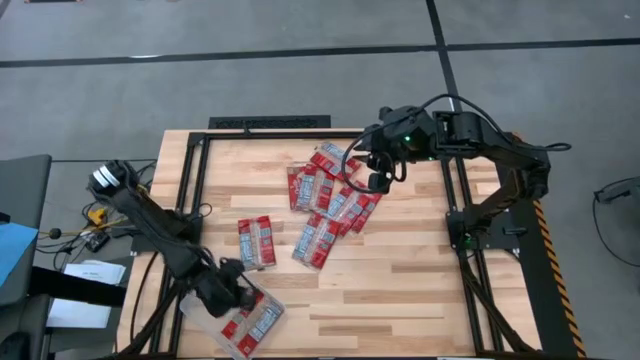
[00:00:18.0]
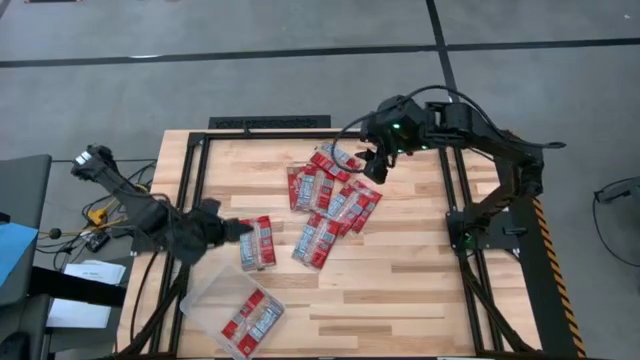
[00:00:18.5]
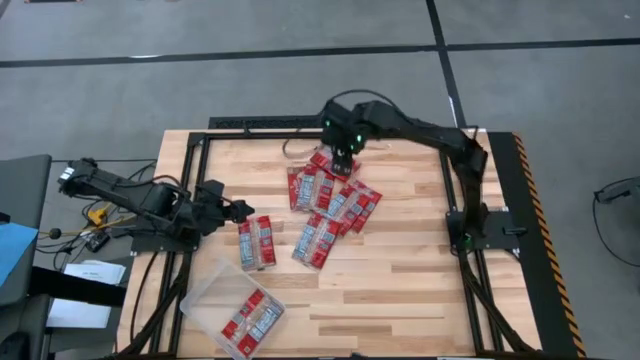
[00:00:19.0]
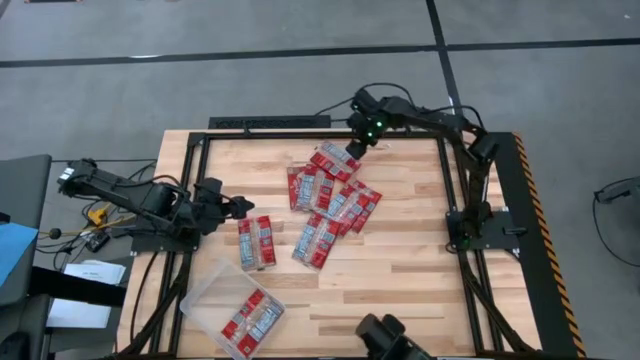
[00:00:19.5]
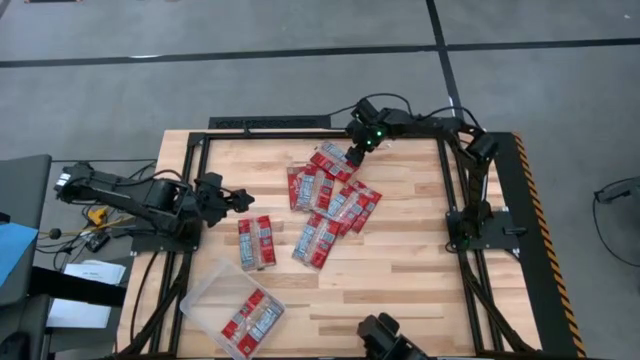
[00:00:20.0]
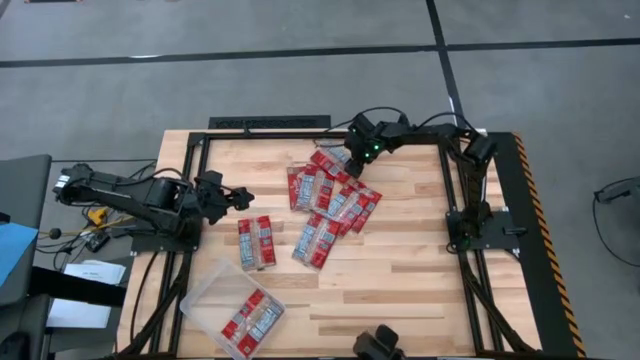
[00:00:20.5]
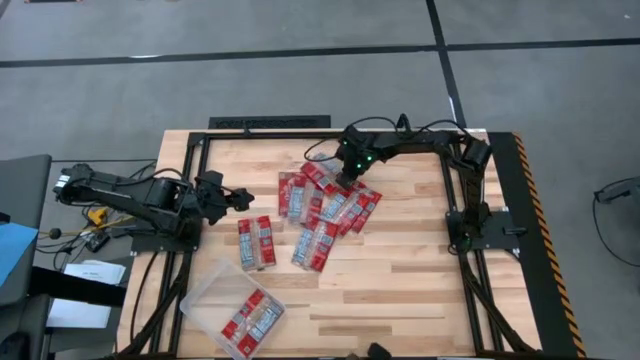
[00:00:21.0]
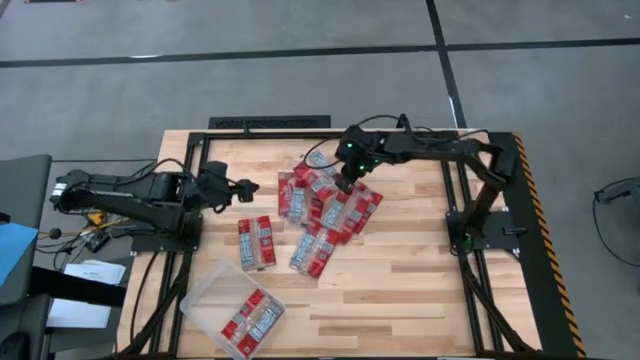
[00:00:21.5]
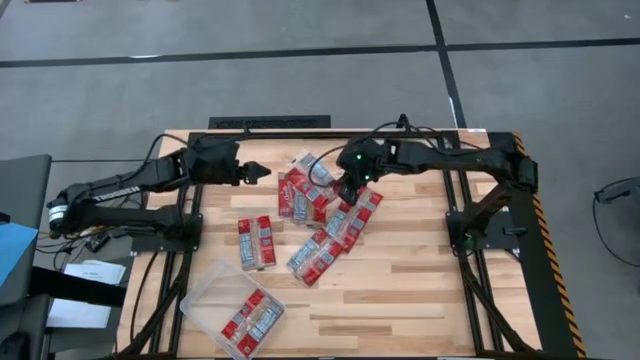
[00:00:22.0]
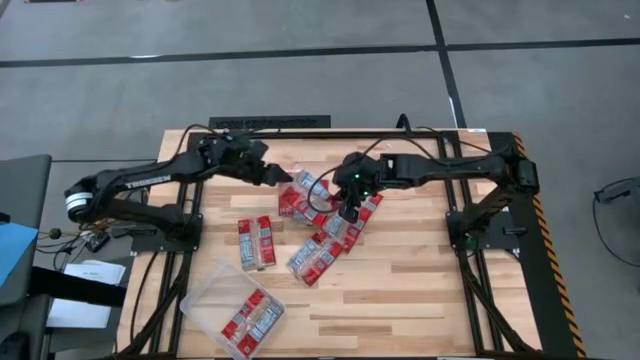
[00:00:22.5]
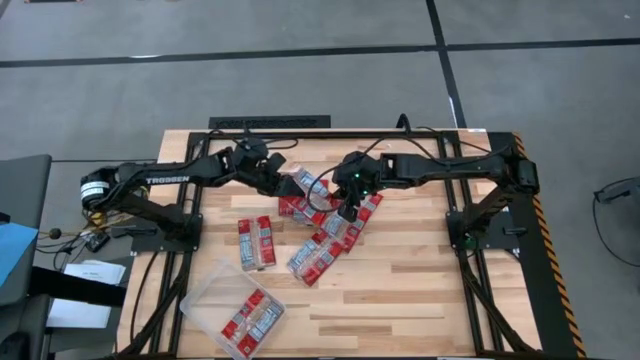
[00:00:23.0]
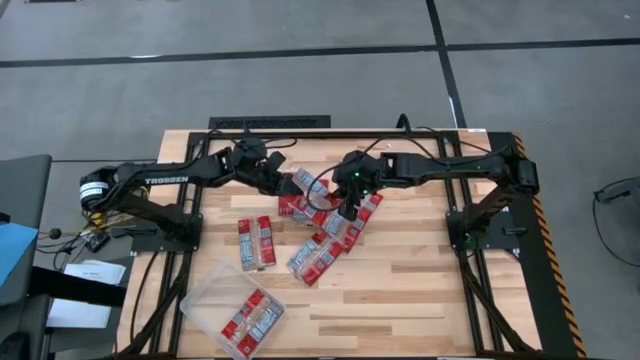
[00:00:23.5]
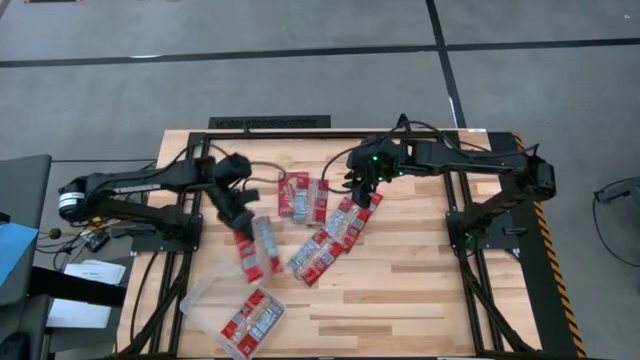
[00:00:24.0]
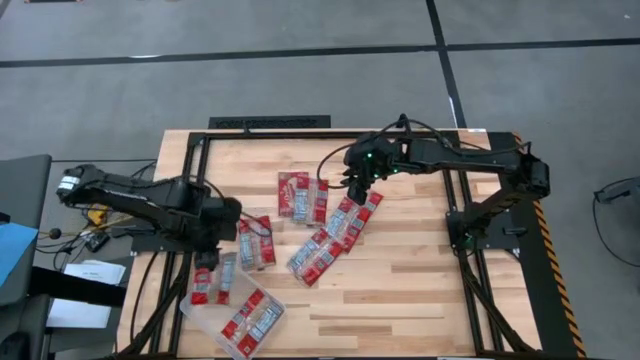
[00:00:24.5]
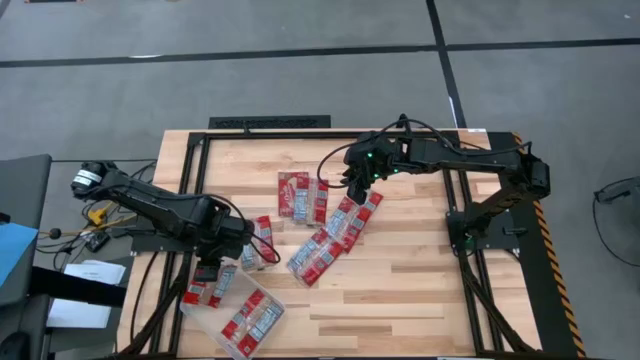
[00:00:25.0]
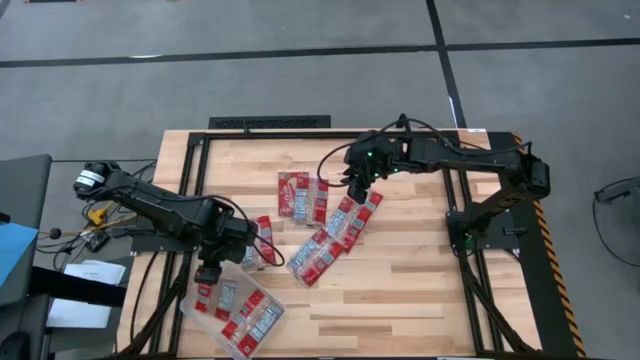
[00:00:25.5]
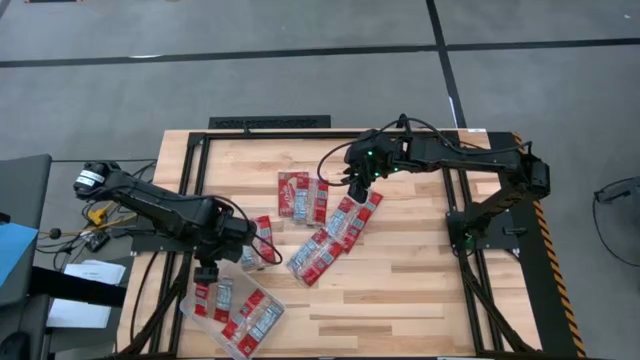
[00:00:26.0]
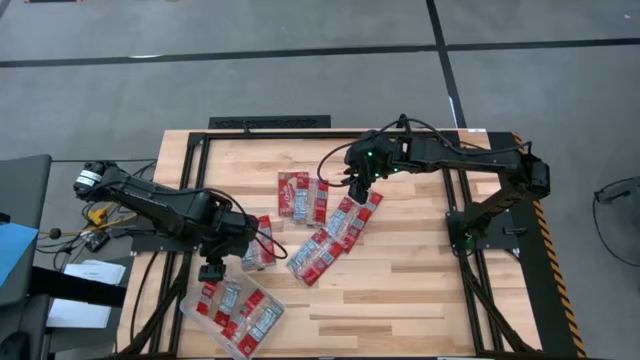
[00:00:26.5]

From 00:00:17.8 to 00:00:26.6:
Task: Sort popcorn bags into baskets
Put the red popcorn bag into the transparent bin

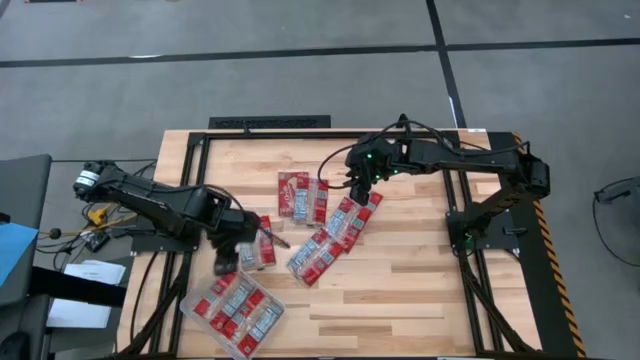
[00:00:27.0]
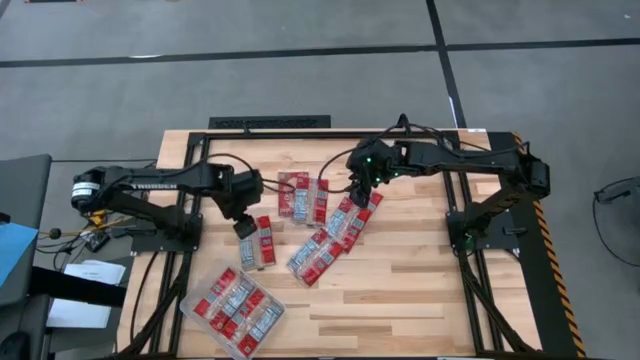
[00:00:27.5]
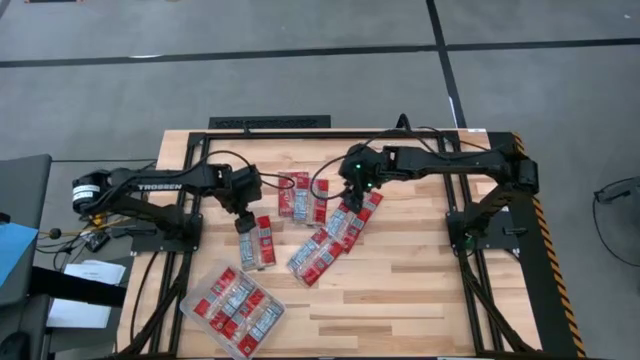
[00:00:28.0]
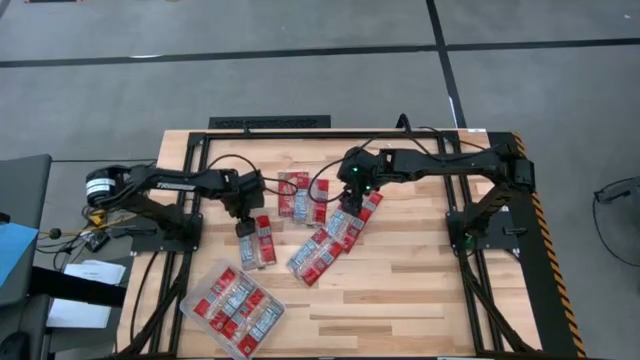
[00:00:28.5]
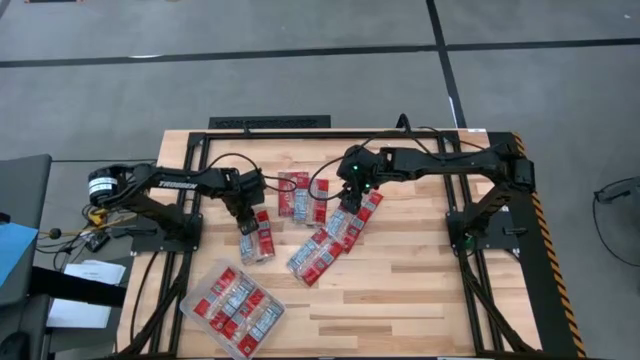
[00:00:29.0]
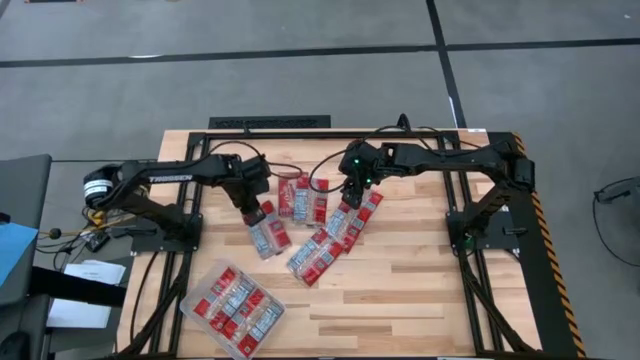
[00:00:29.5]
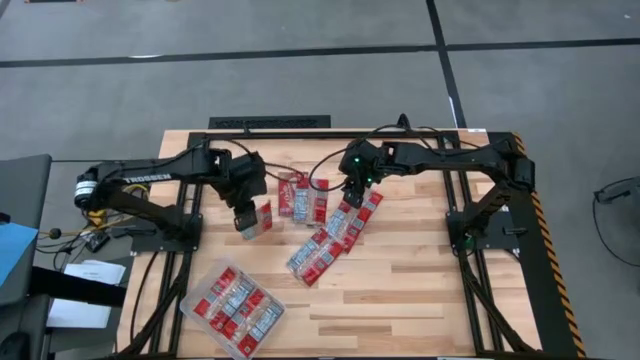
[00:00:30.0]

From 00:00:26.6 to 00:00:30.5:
Put the red popcorn bag into the transparent bin

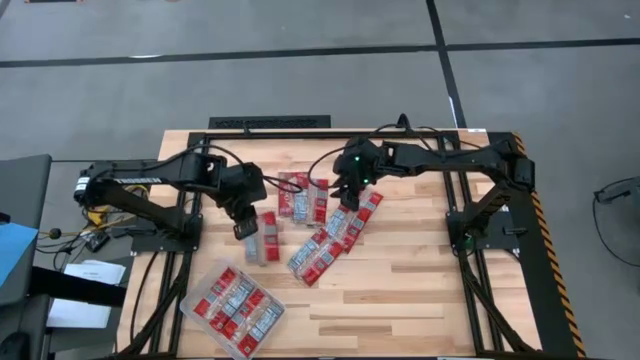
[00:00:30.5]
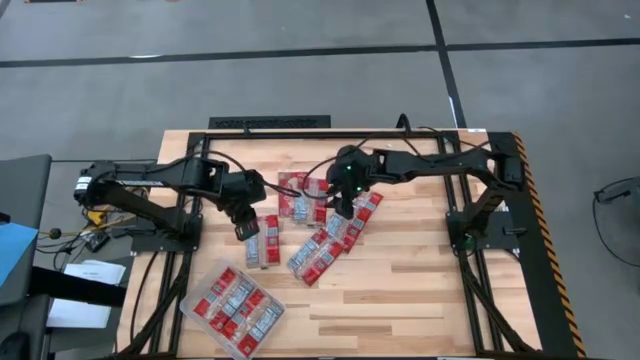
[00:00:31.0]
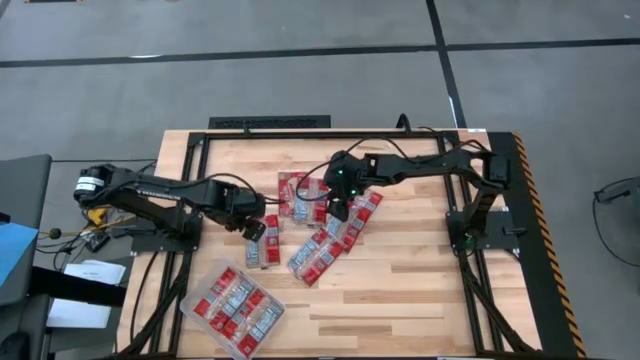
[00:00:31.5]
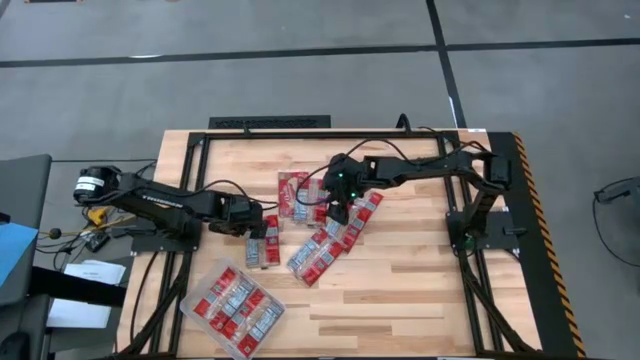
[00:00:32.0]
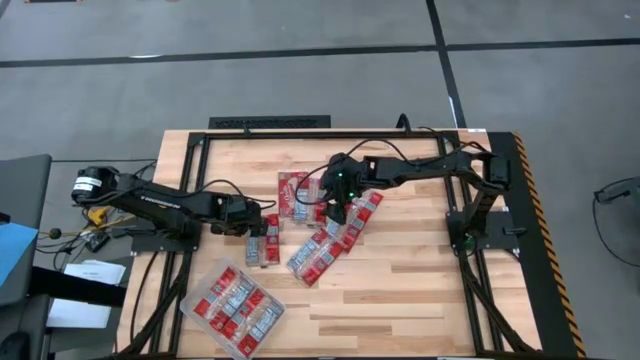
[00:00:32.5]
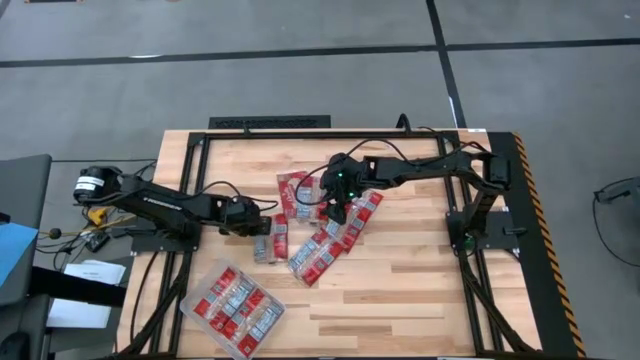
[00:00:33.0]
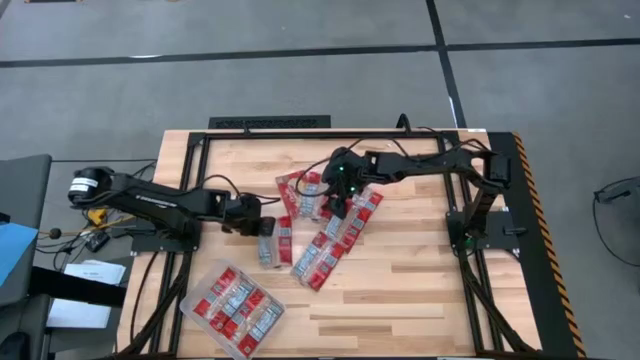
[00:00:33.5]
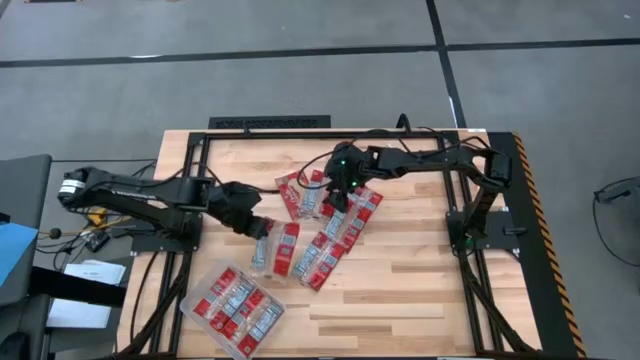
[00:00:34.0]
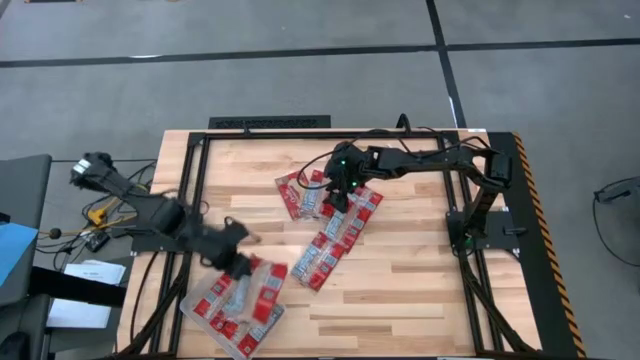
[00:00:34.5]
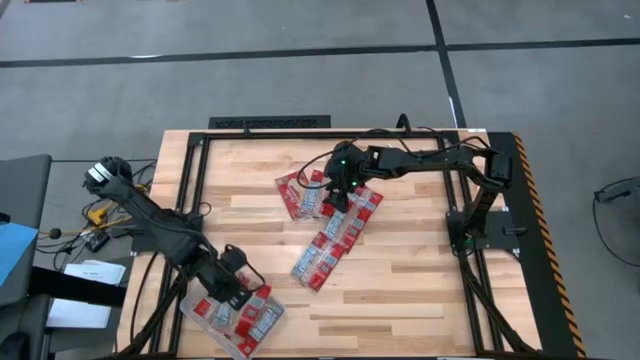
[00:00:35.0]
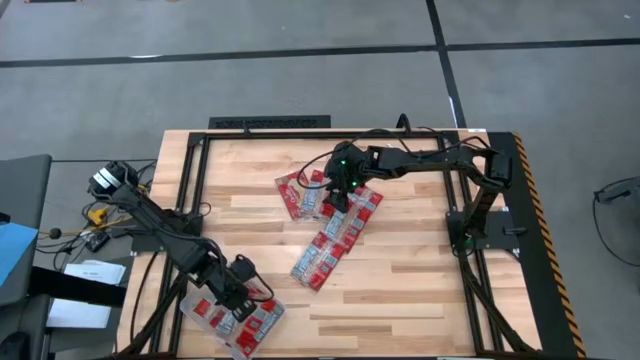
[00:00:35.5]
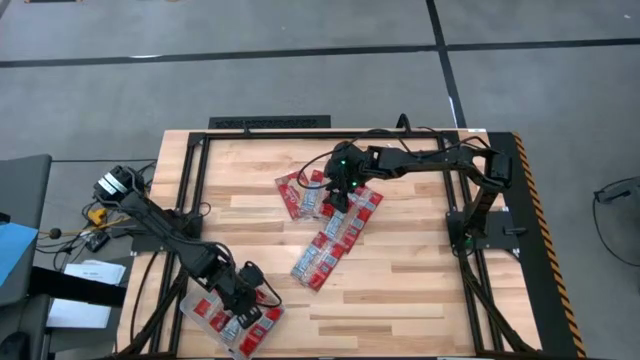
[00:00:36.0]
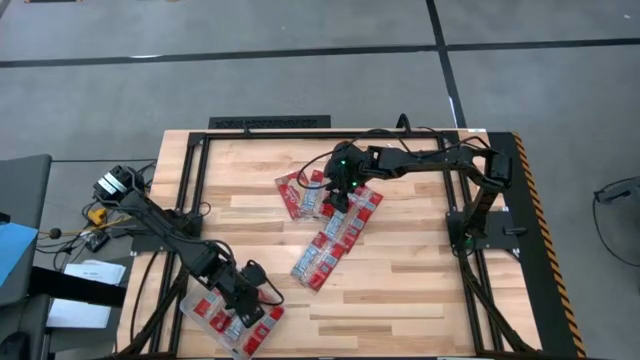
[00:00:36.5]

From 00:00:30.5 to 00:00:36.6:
Put the red popcorn bag into the transparent bin

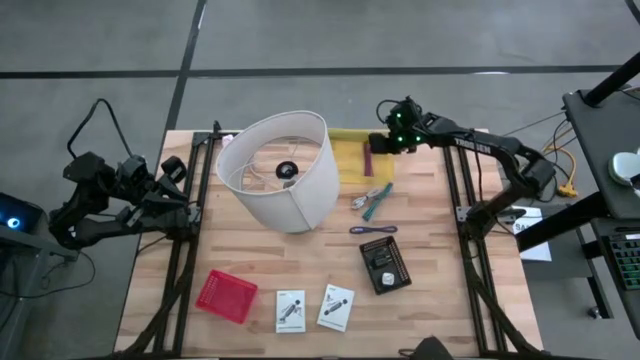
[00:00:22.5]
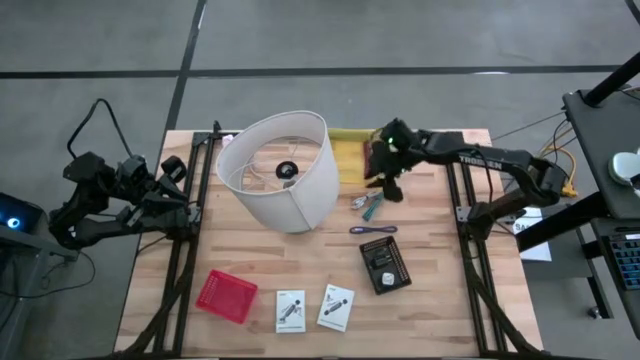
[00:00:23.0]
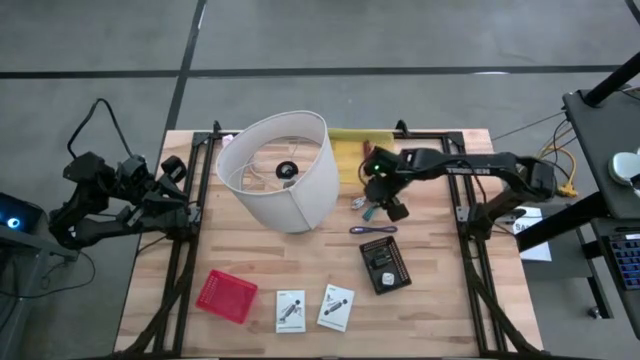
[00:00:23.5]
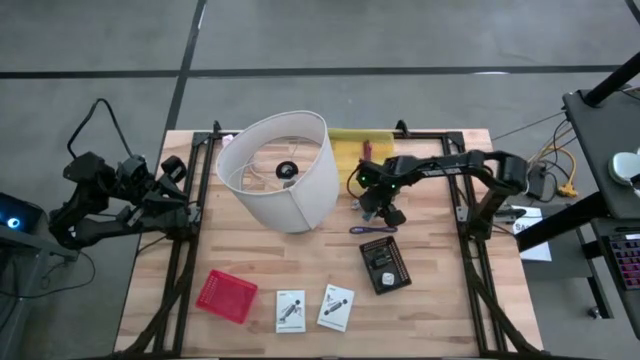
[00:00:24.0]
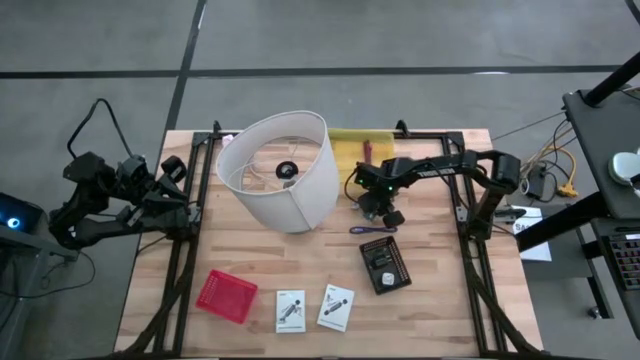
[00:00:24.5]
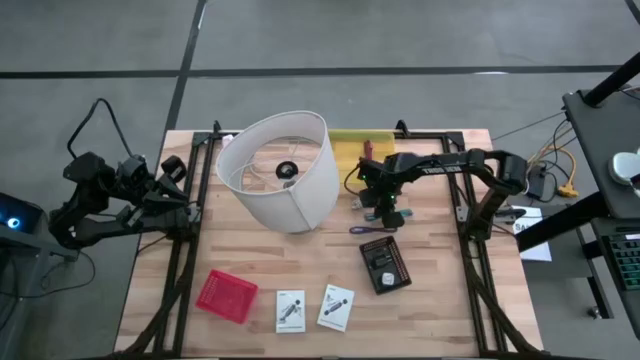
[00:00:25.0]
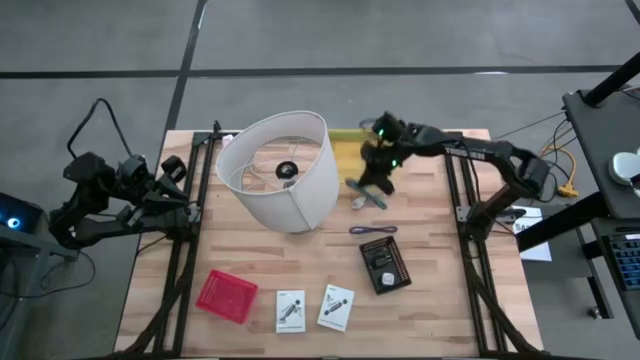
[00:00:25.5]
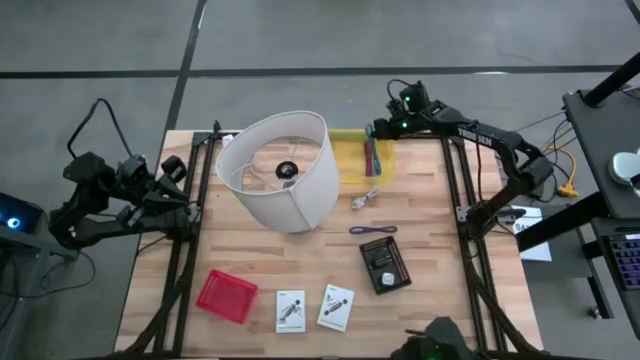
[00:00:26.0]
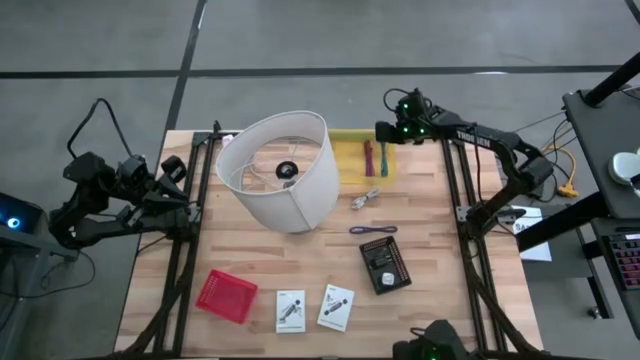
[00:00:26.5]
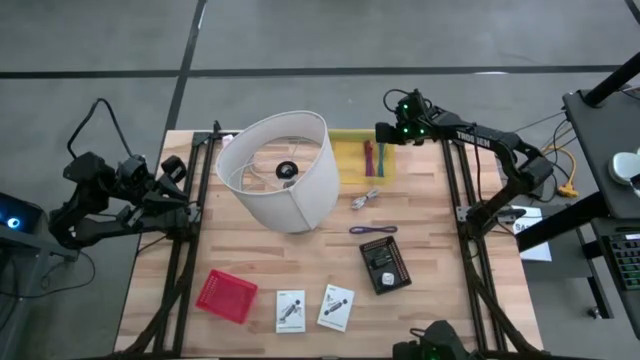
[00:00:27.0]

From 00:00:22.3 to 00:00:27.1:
Task: Pick and place items into bin
Put the blue cable into the yellow bin
